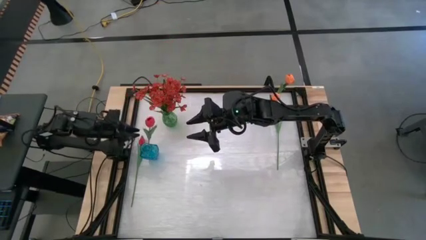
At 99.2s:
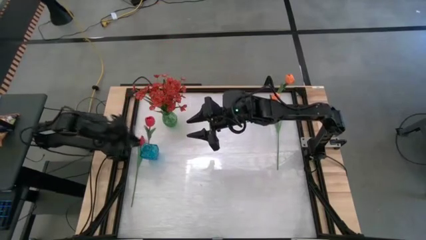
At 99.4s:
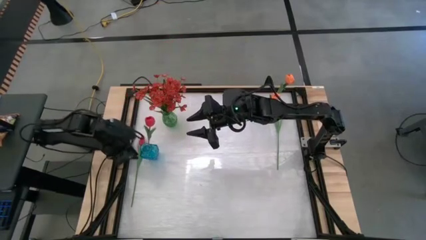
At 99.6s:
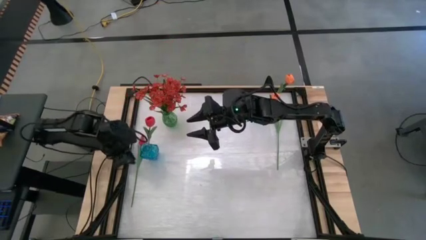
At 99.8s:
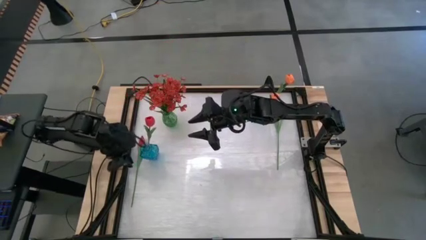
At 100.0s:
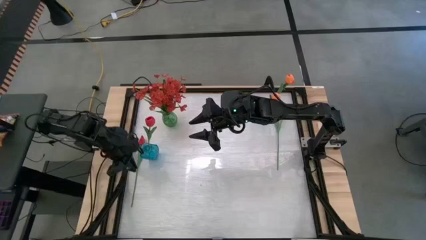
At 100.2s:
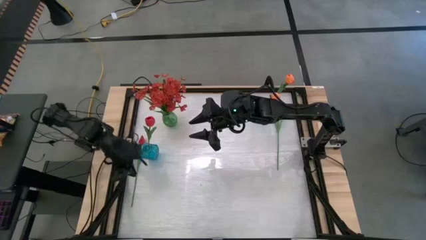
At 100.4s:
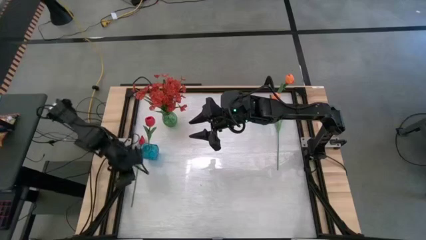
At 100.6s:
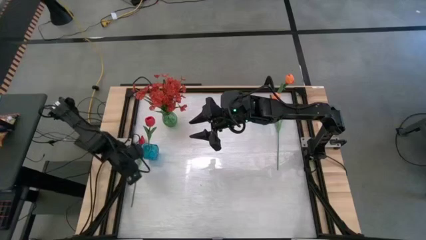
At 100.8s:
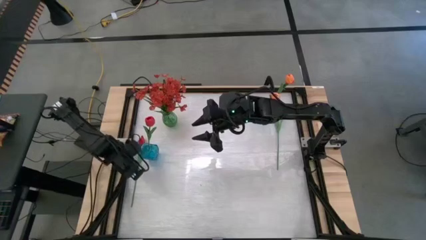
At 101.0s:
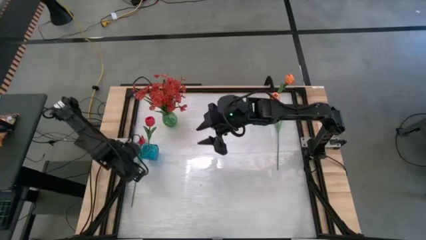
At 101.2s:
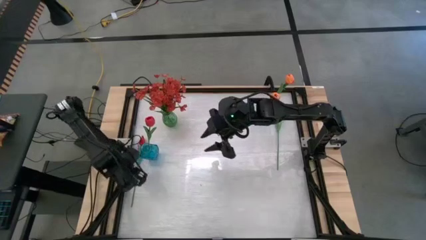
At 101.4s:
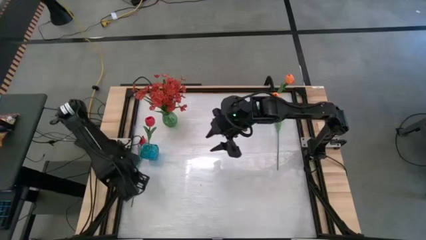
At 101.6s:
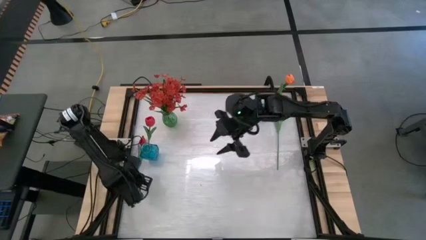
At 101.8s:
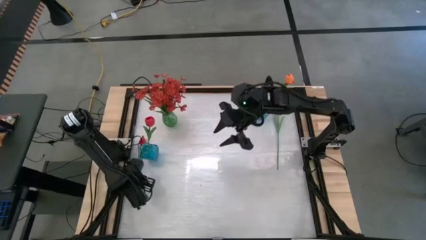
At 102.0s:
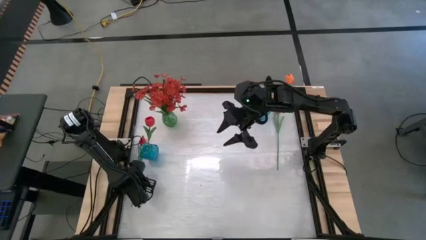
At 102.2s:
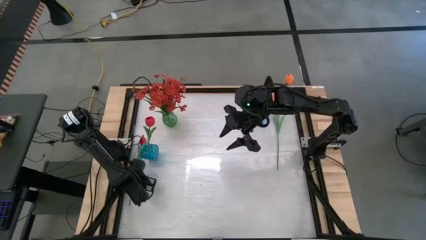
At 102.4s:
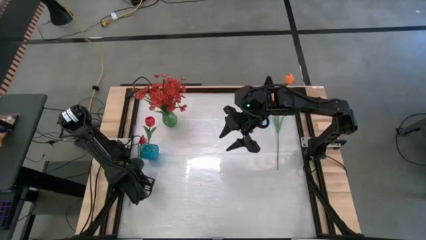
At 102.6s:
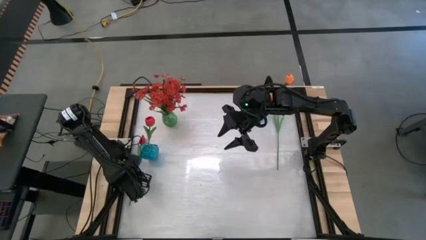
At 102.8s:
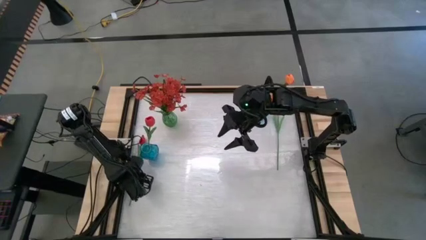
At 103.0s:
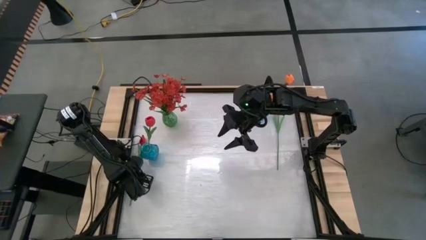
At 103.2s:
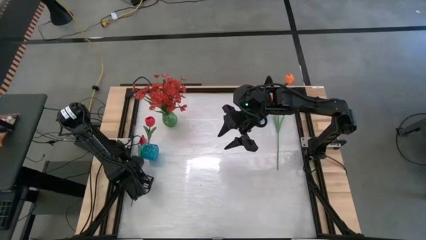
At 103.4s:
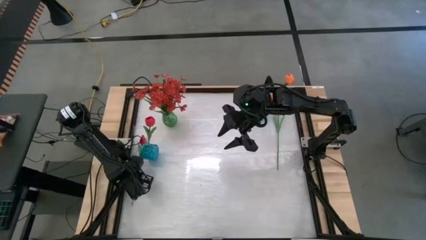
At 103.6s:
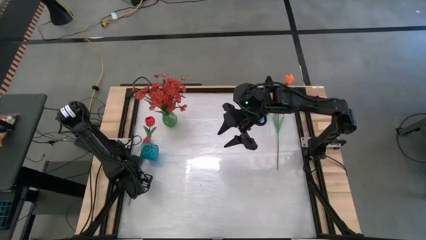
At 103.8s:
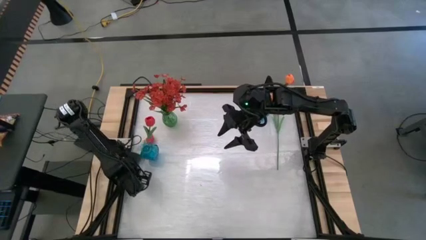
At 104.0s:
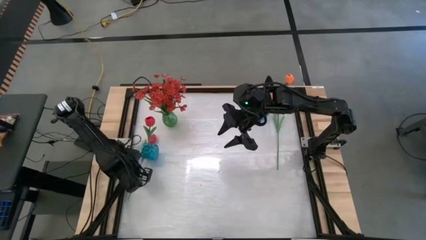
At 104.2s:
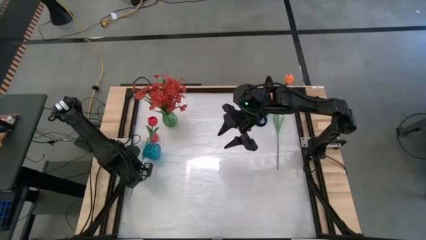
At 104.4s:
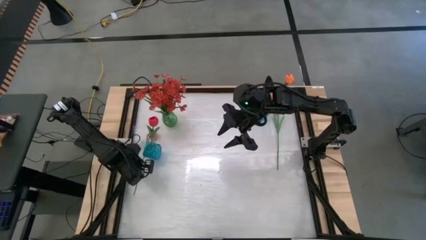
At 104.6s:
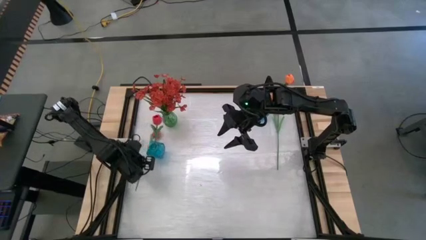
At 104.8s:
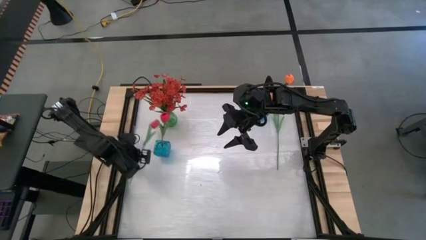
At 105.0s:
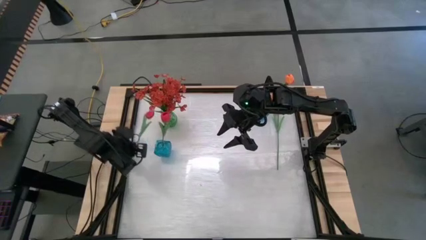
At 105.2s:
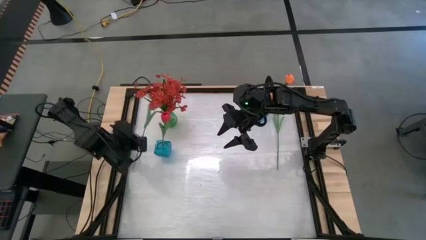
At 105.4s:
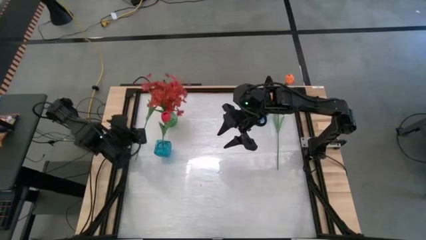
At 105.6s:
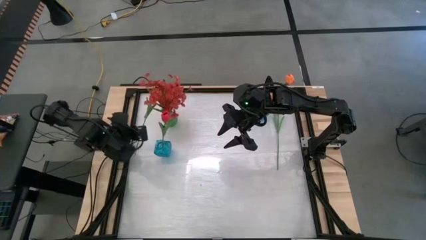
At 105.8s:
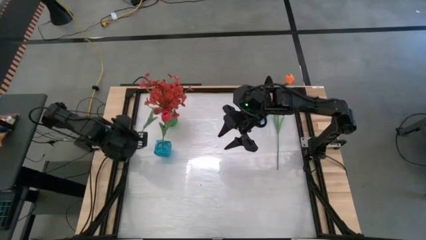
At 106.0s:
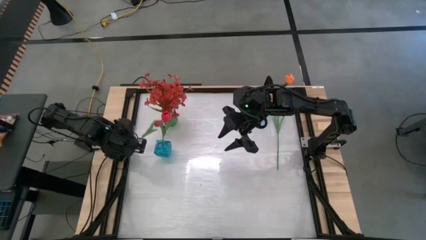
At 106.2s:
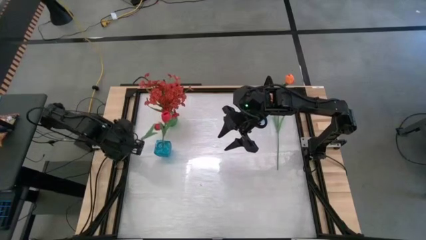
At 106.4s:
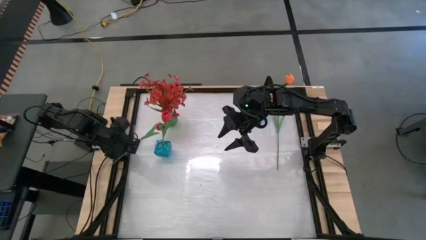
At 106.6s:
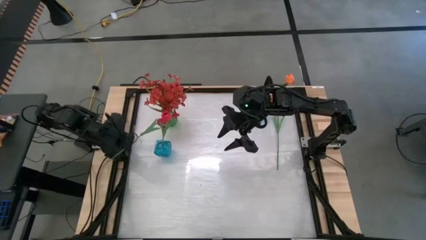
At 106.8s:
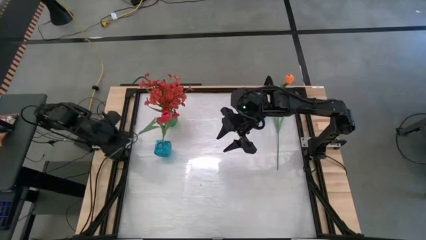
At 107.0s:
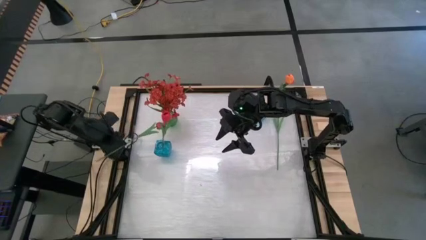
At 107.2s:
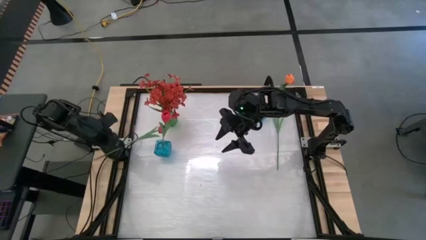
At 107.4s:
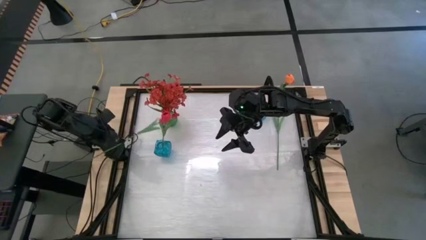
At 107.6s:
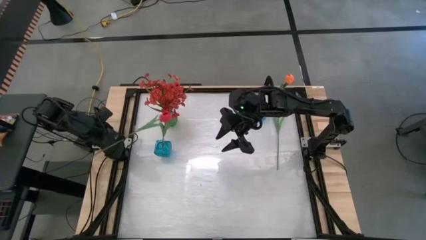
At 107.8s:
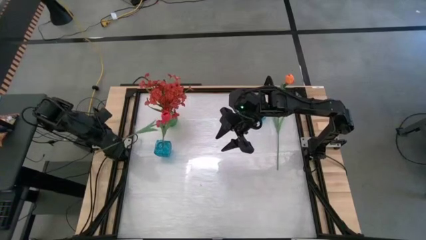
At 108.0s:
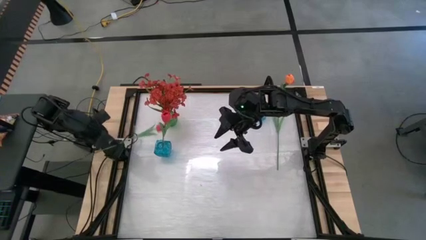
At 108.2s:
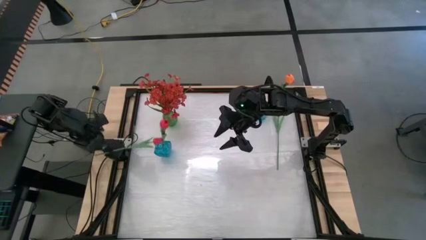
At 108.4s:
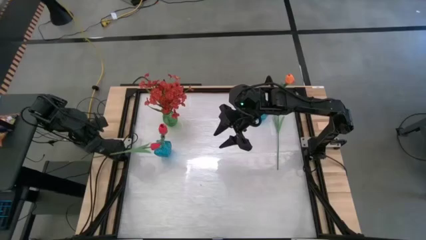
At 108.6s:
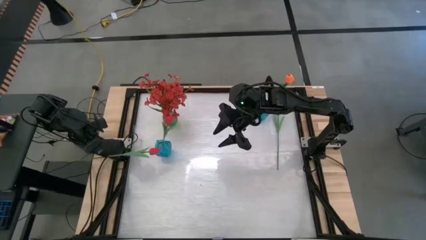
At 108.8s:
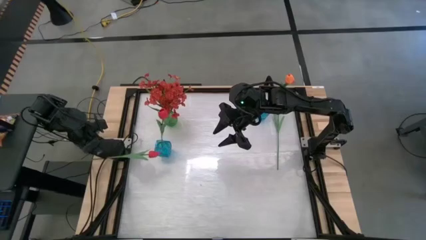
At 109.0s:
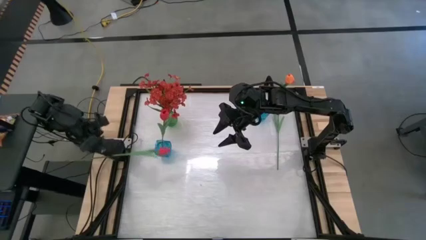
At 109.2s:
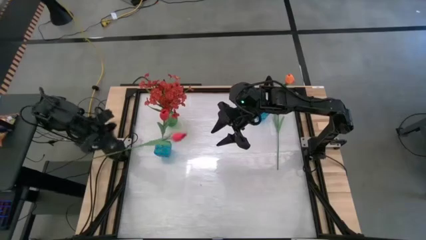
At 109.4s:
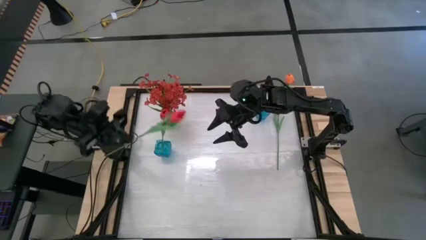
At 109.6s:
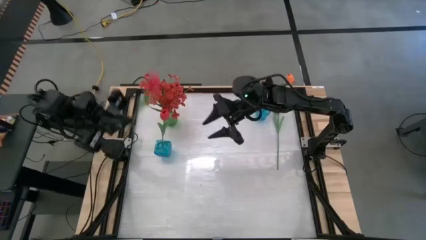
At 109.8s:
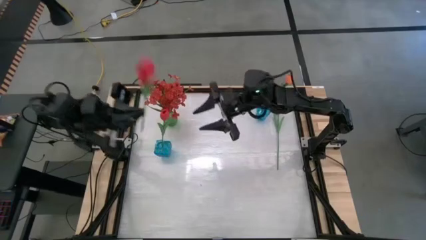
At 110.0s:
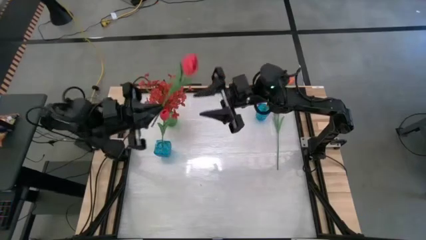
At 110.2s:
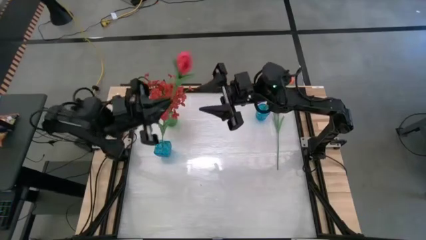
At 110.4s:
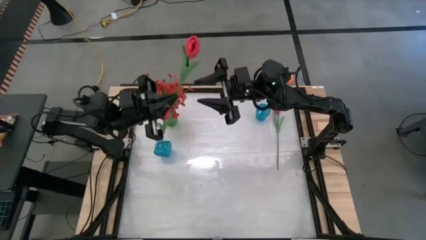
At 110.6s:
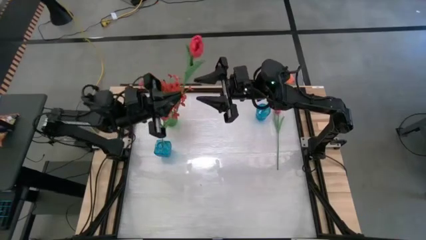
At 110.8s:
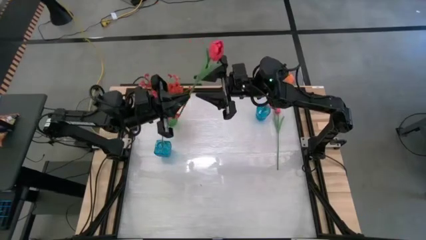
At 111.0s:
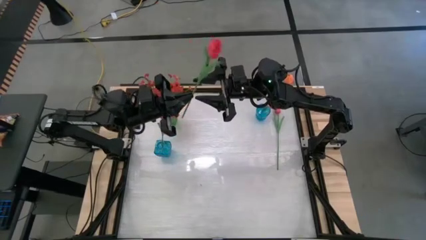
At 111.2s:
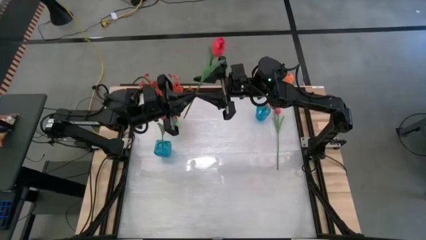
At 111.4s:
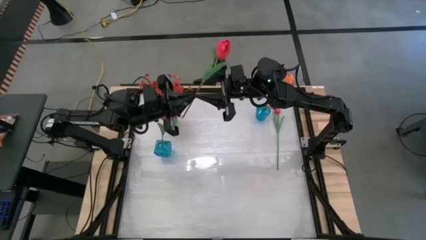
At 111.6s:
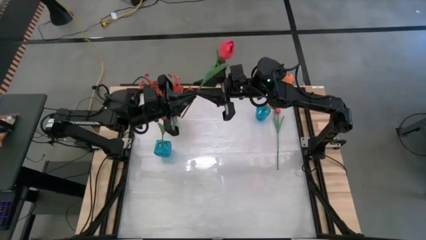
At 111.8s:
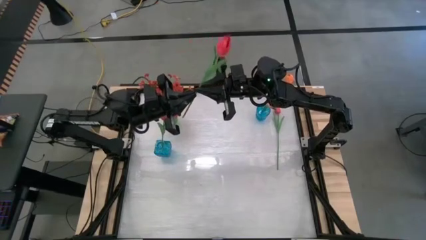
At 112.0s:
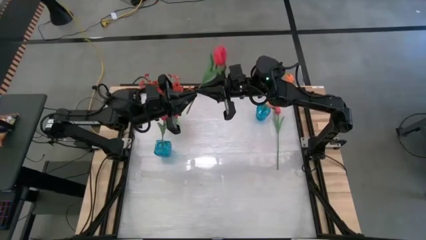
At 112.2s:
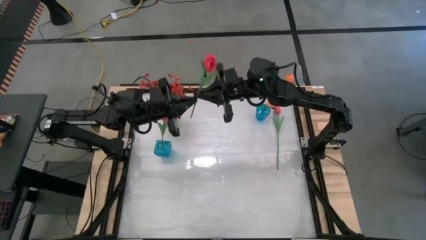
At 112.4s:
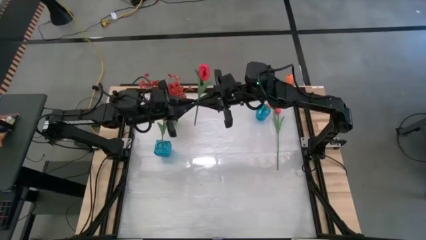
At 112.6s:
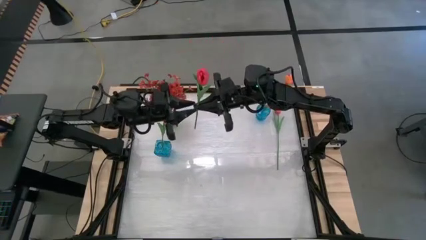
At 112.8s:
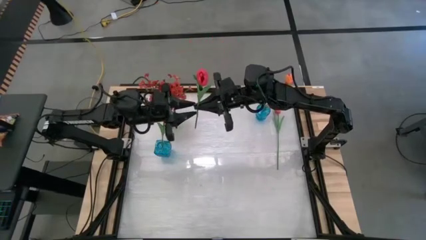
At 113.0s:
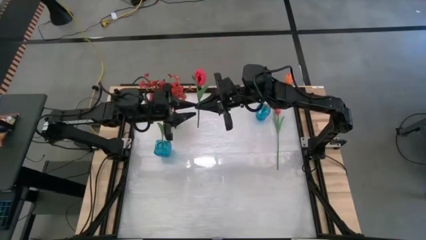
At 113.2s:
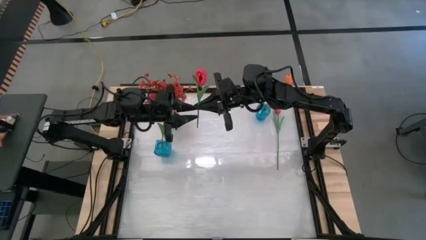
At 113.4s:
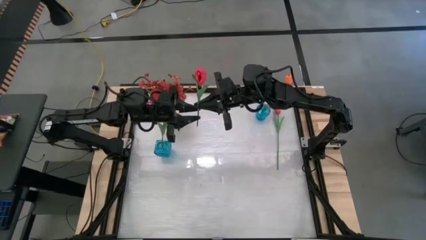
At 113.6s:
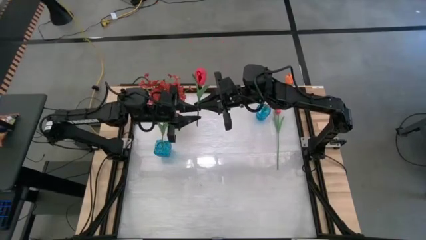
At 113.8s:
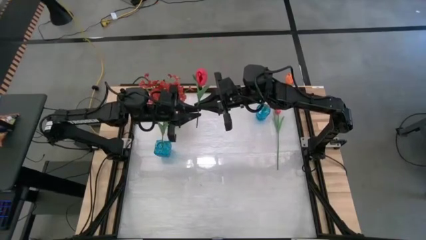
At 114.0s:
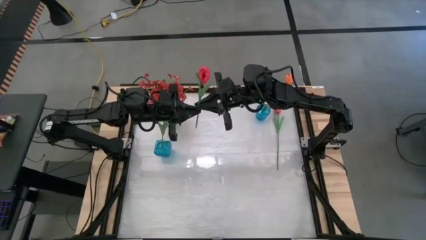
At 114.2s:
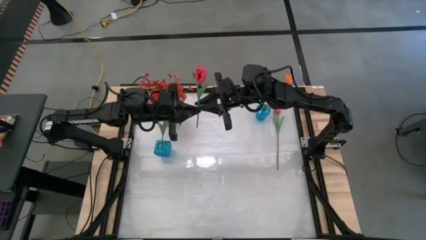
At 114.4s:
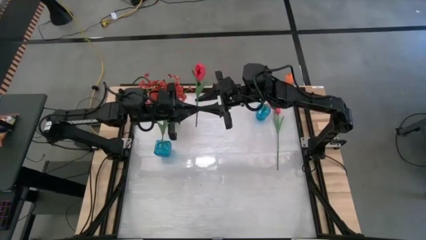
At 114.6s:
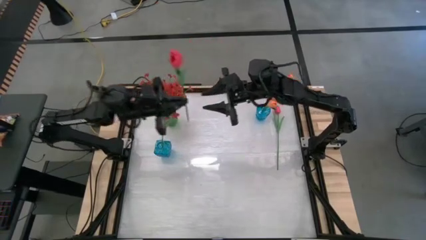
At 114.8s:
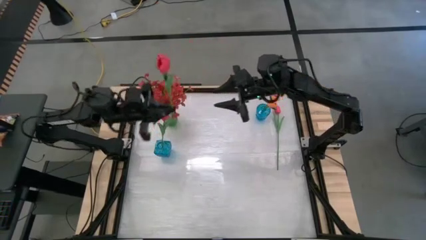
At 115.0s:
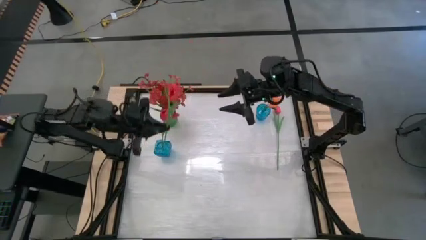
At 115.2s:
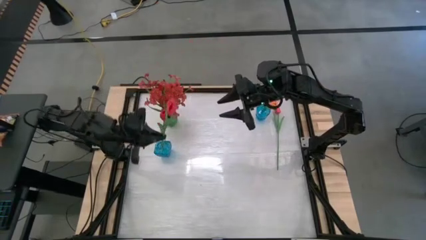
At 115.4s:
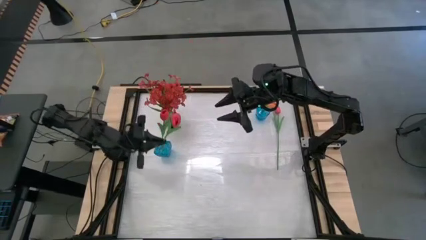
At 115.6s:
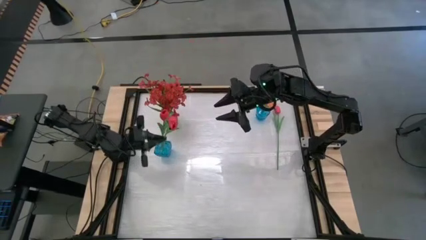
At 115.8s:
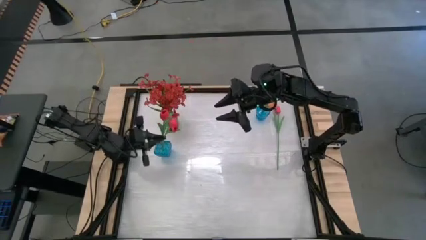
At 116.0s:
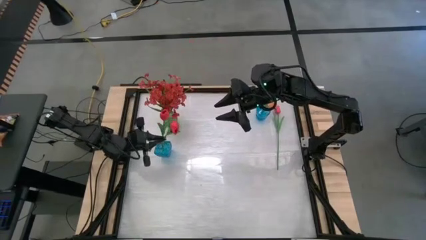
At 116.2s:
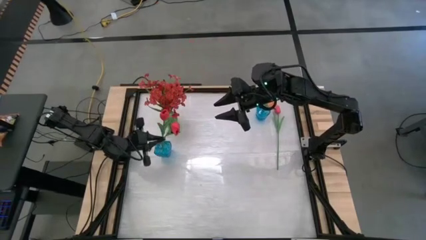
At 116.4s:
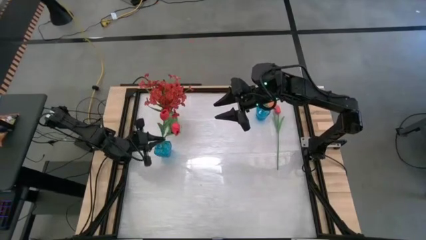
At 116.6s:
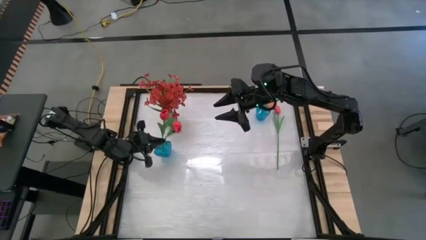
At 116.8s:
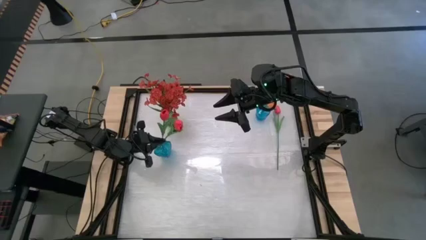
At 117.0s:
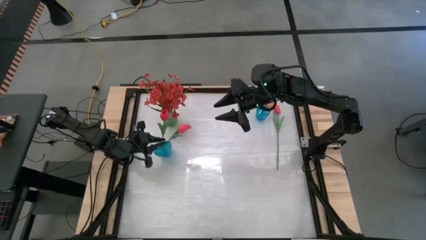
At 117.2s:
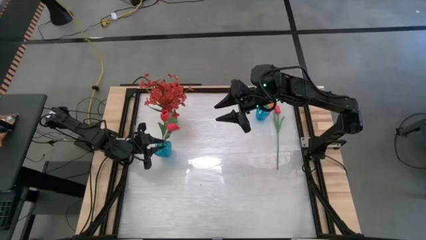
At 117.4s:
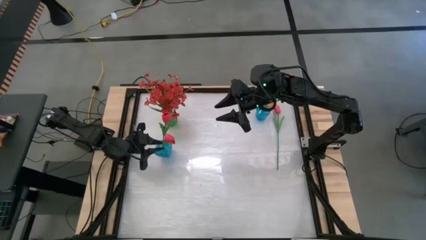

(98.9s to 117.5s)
Task: Sort flowers into vase by color
Put the left red tulip into the left blue vase
